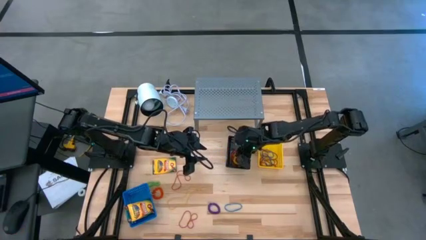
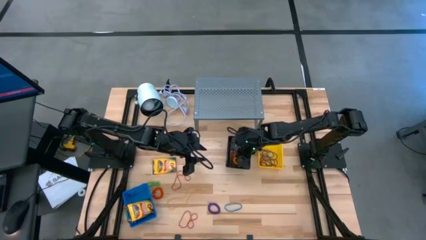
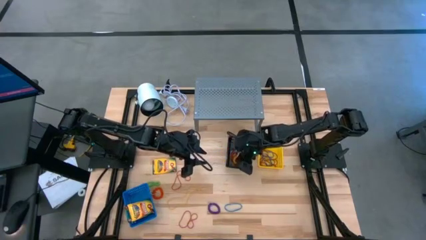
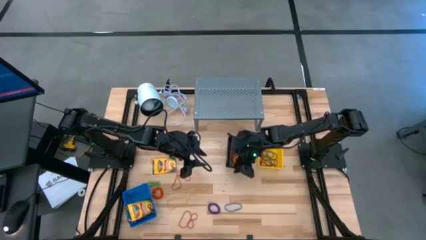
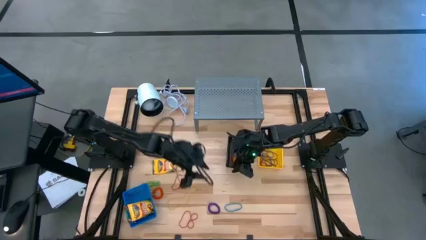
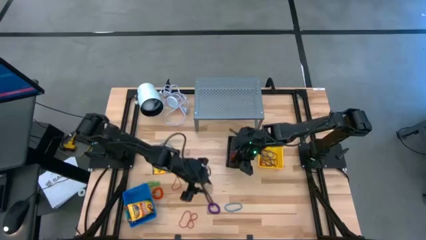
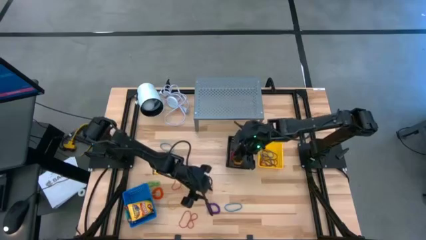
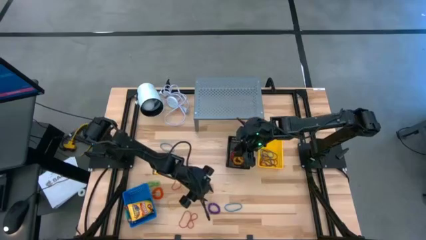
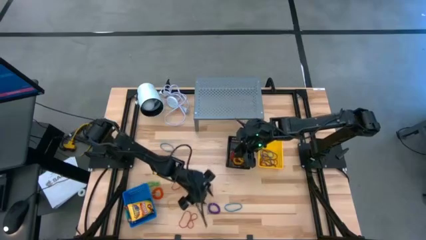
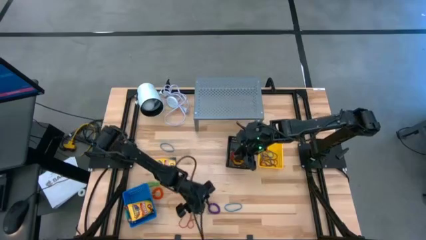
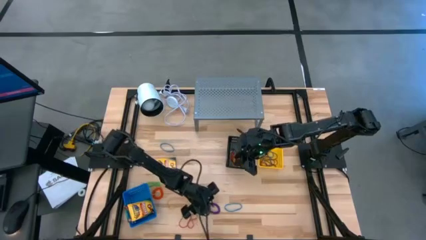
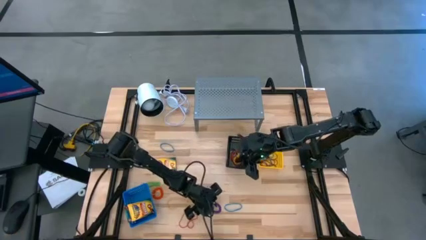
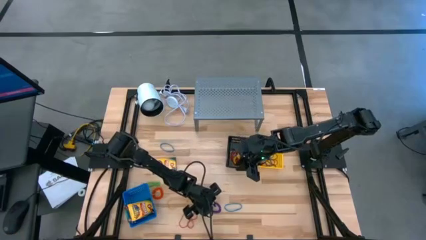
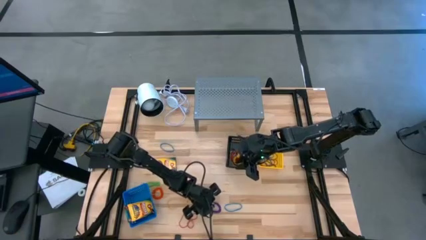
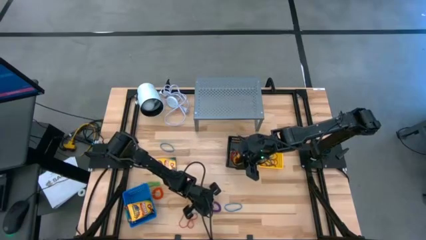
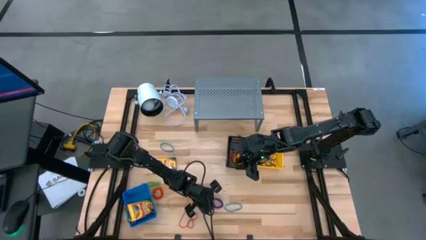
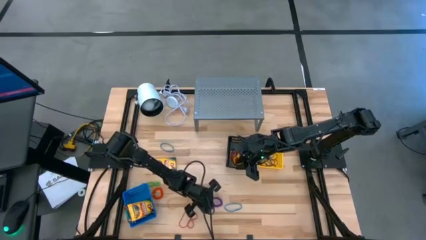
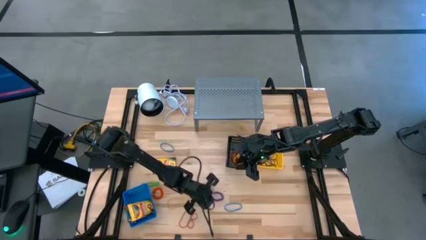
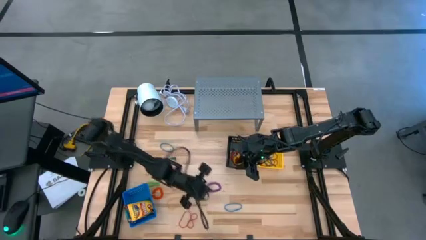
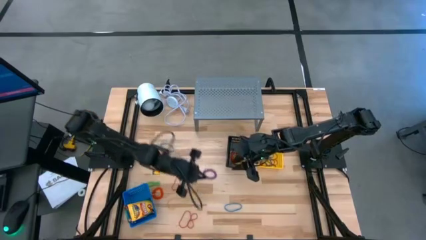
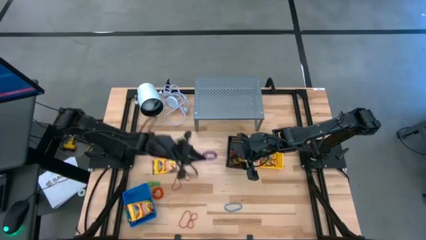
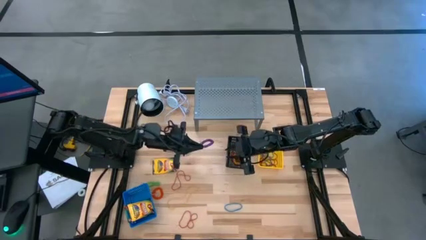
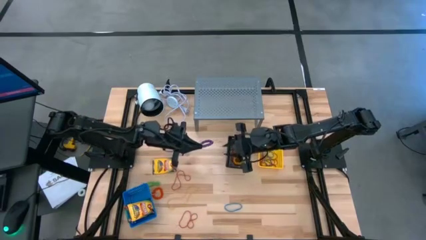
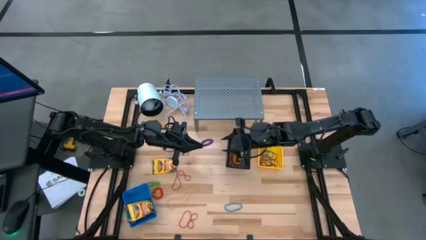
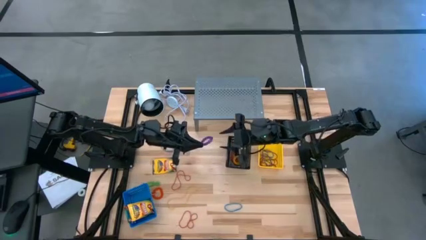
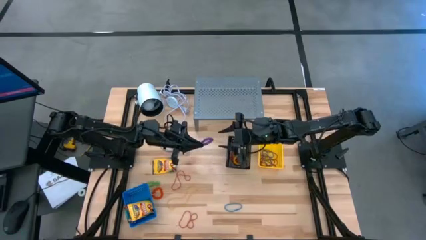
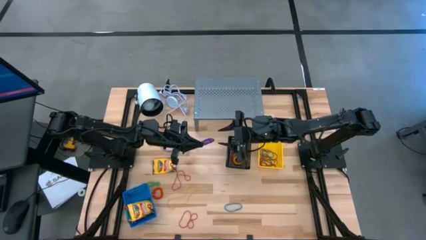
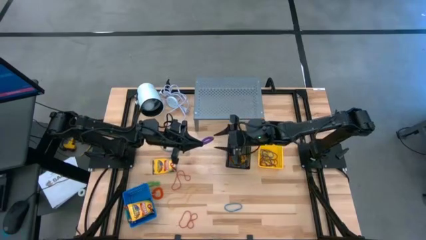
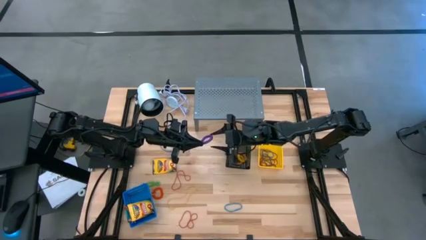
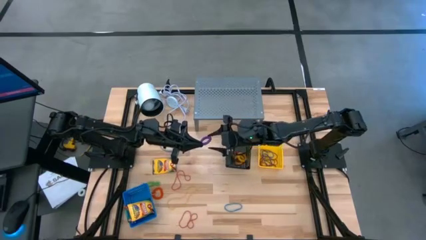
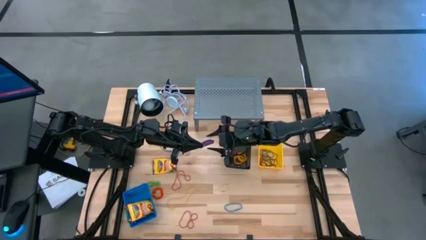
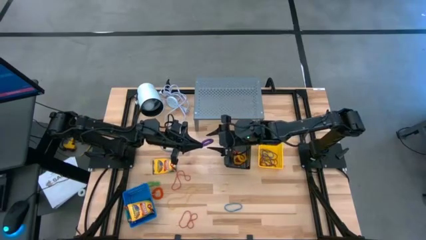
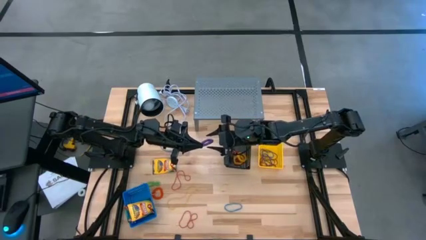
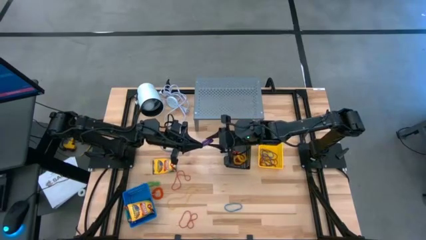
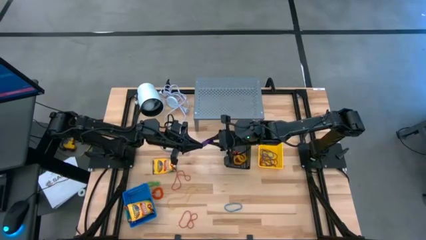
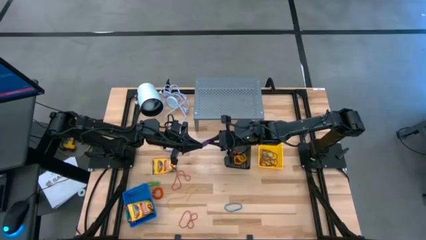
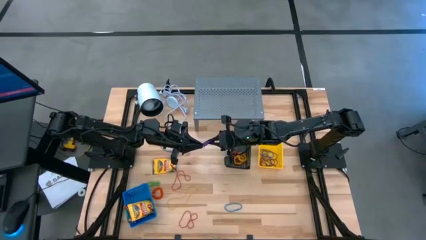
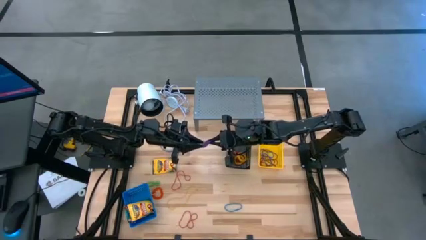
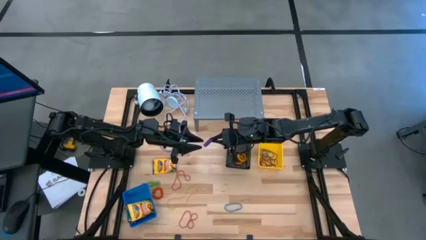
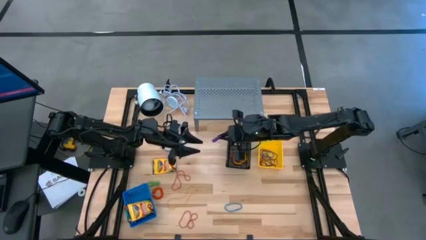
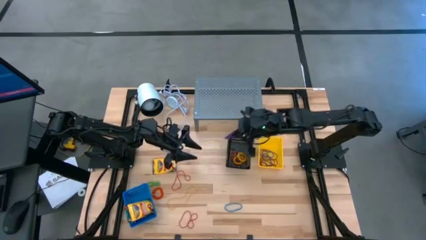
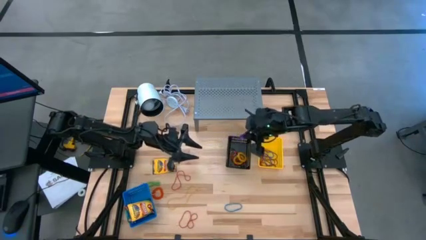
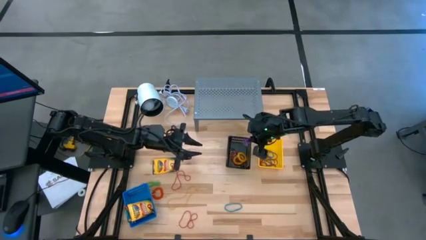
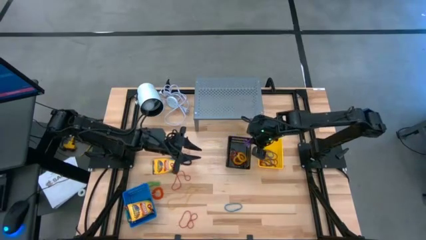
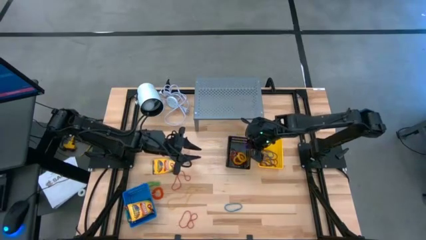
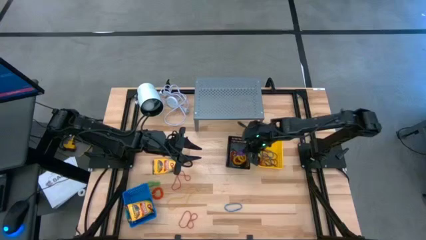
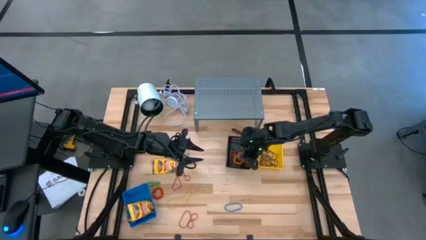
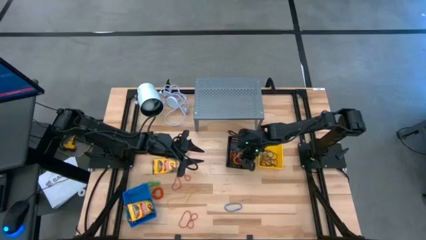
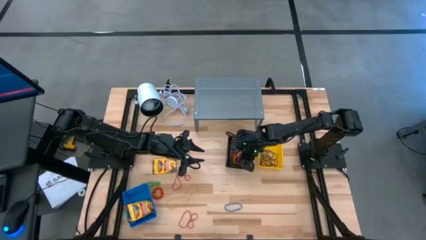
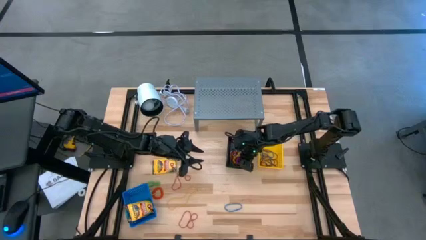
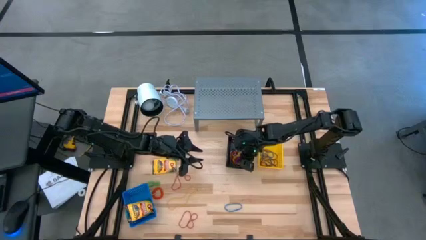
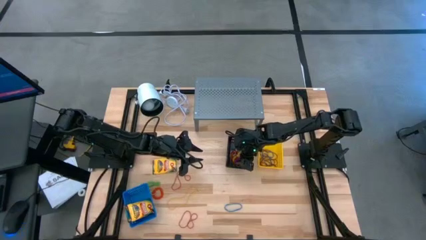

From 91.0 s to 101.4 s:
Task: Pick & Place Office Desk Supplies
Put the violet spring keychain into the black basket

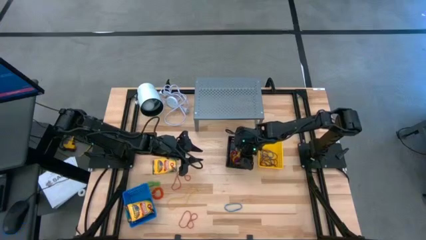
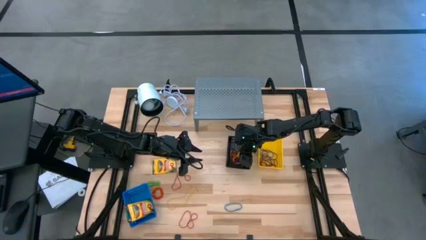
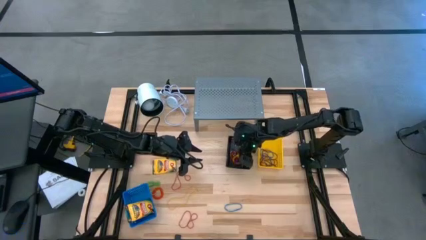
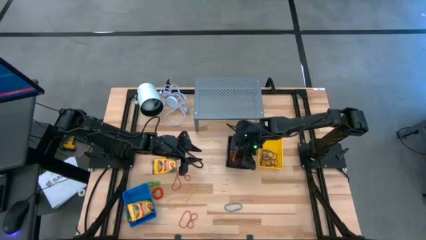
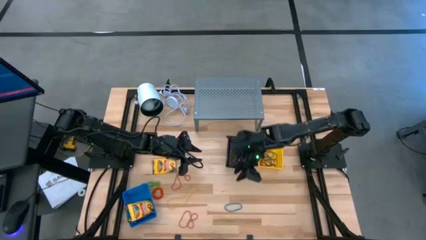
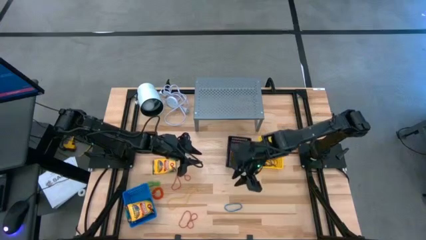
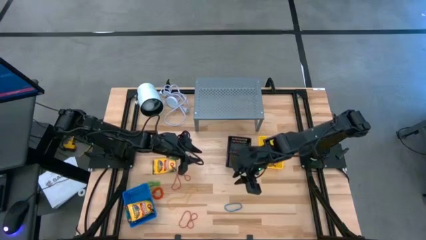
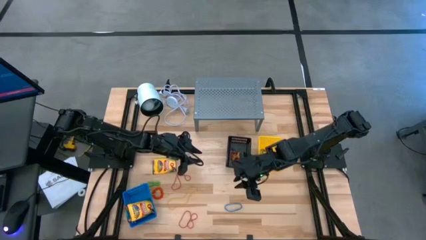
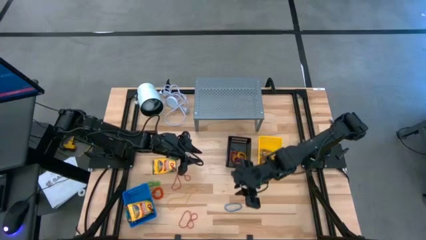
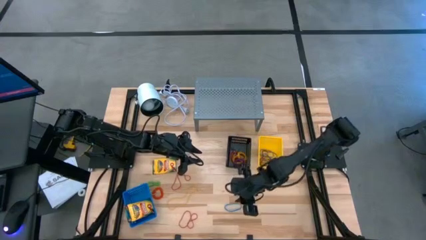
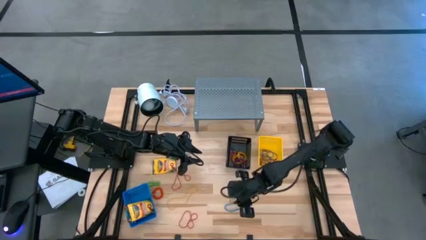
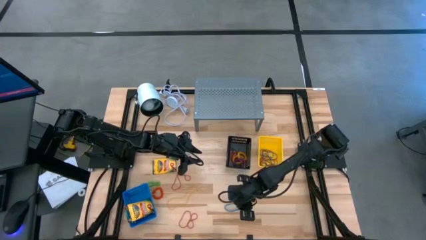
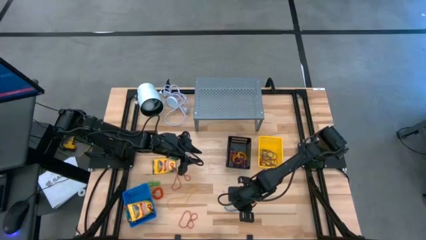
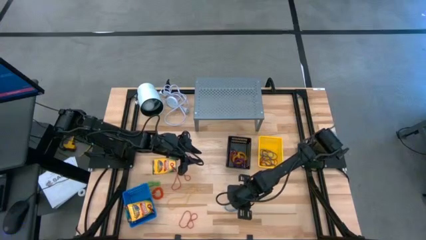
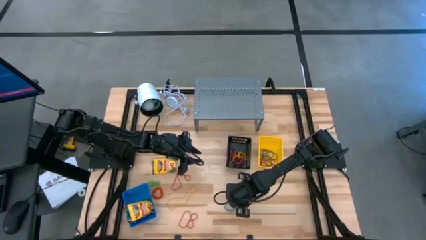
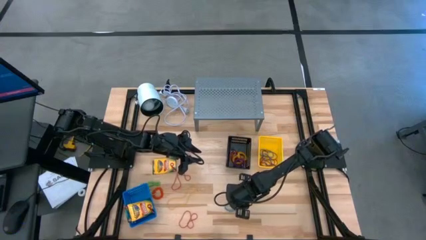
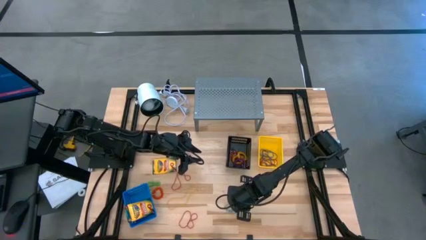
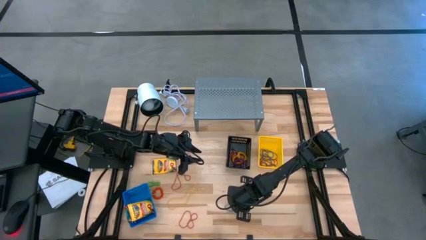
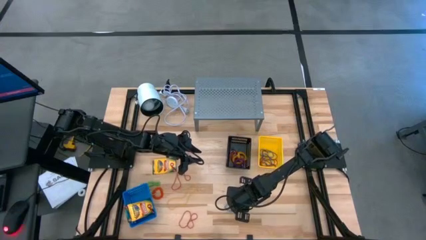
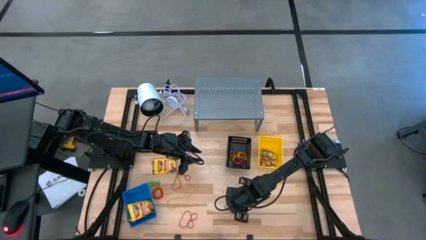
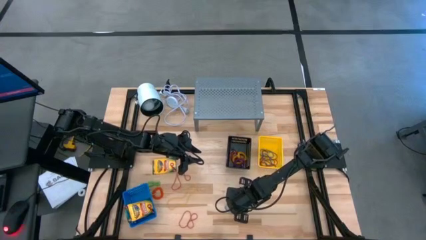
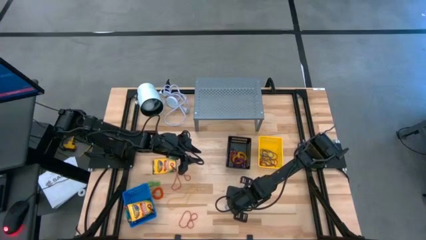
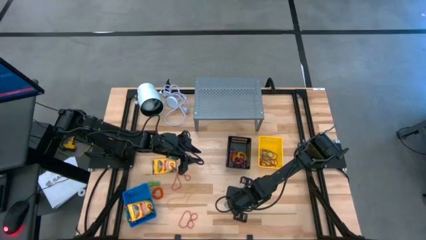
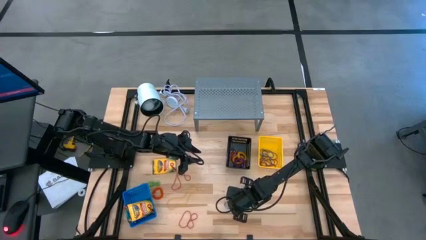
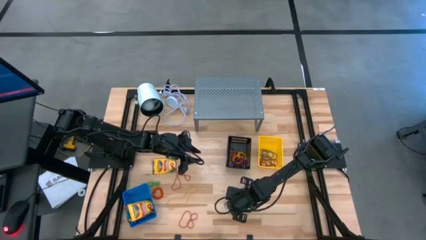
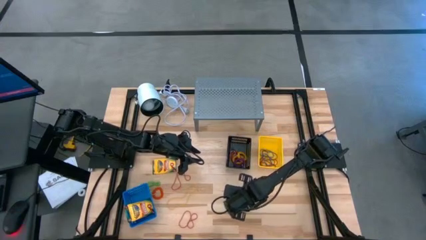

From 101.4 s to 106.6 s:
Put the blue rubber band into the yellow basket
